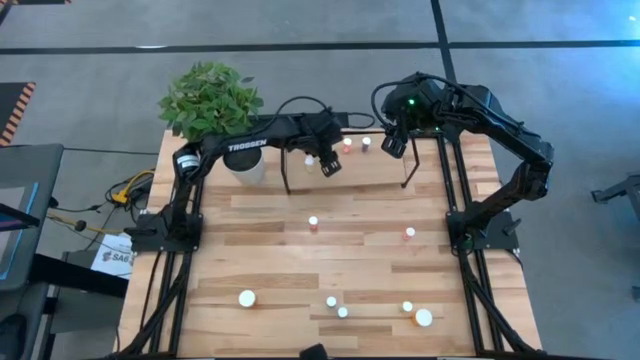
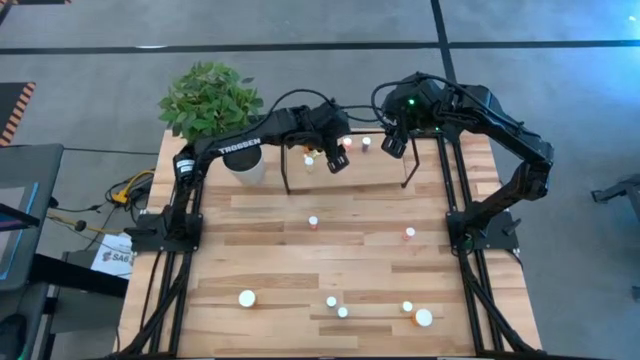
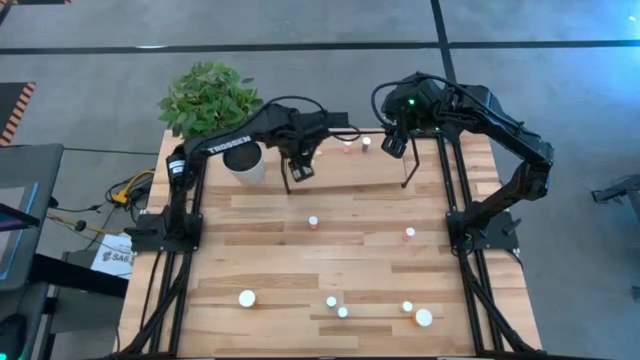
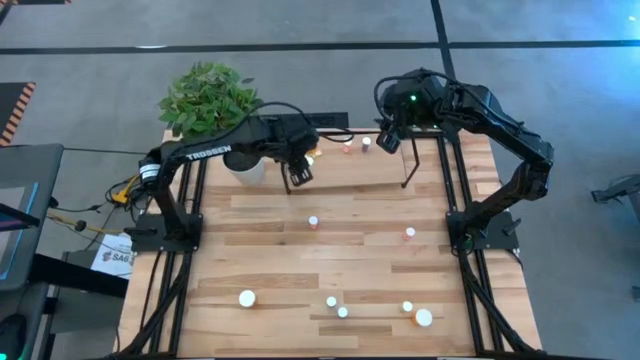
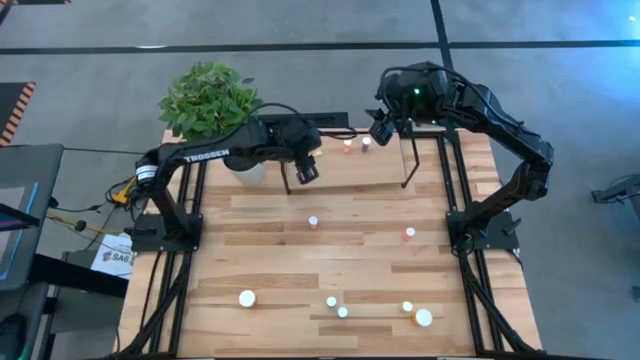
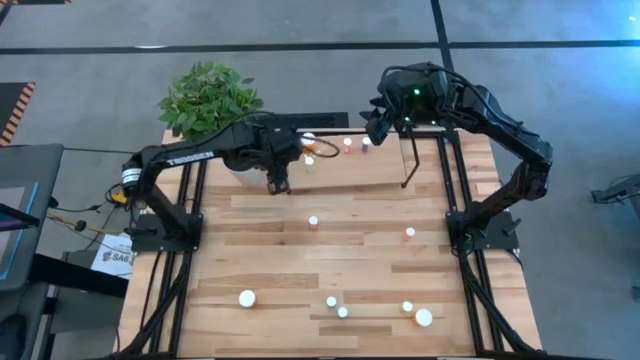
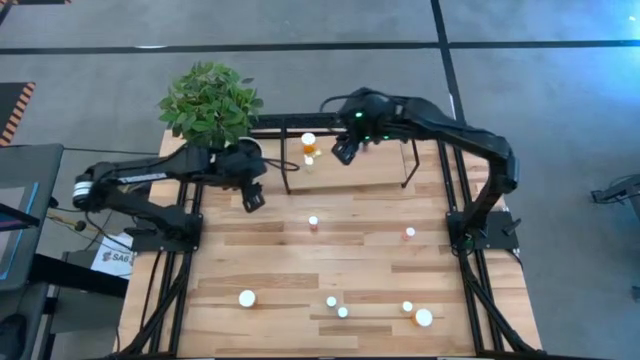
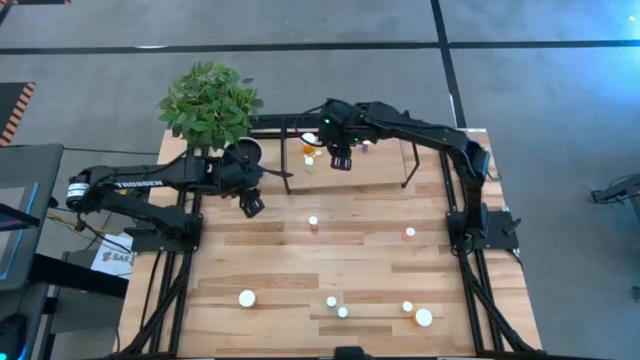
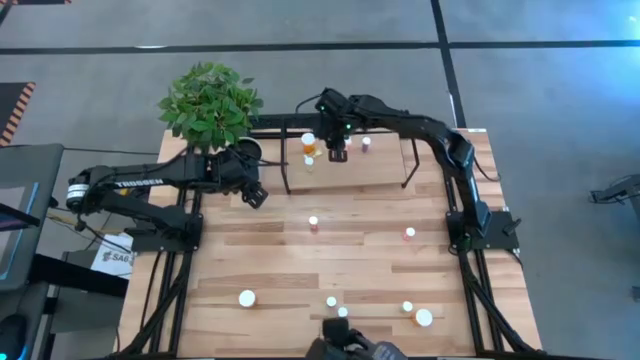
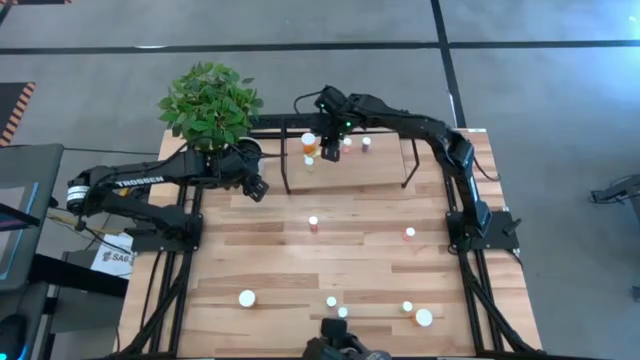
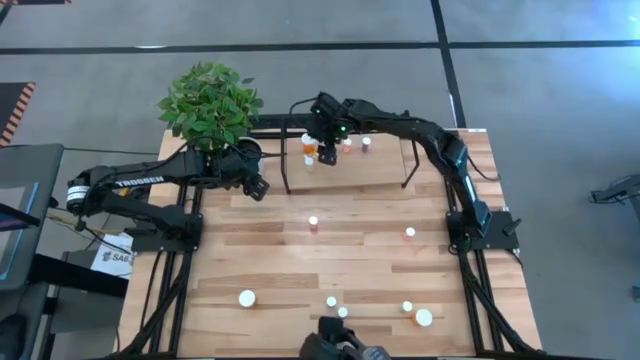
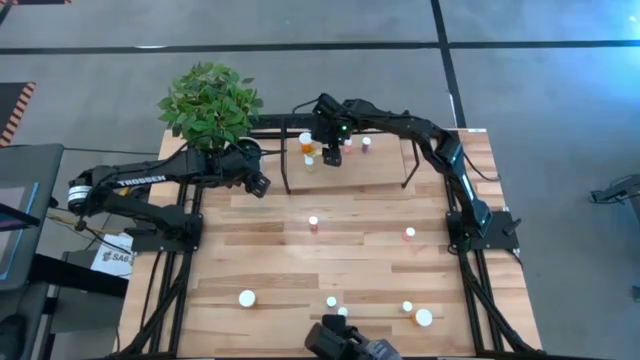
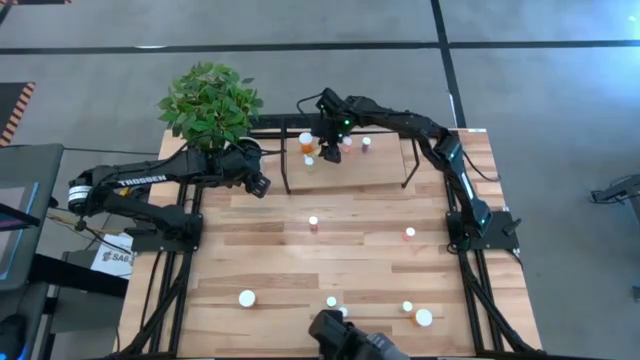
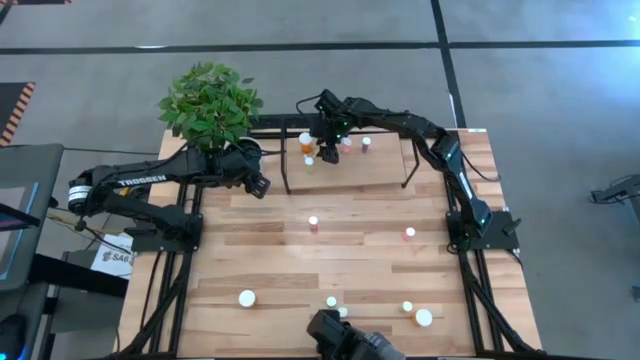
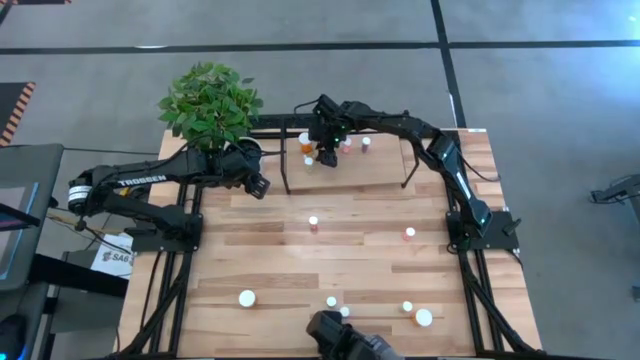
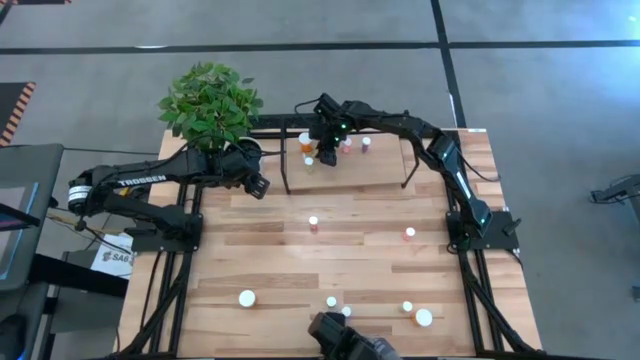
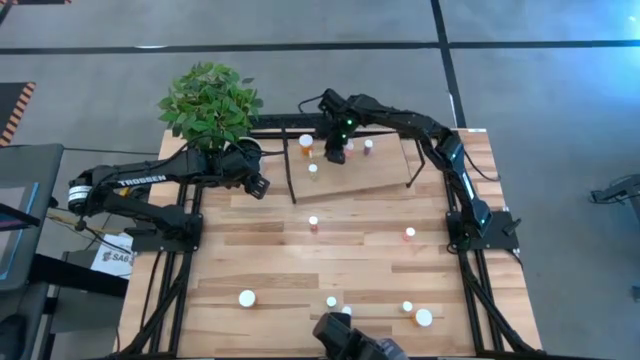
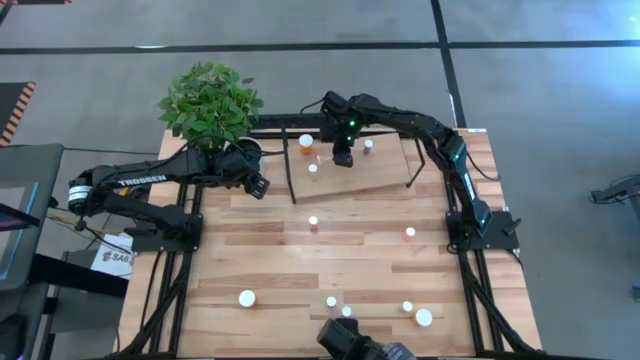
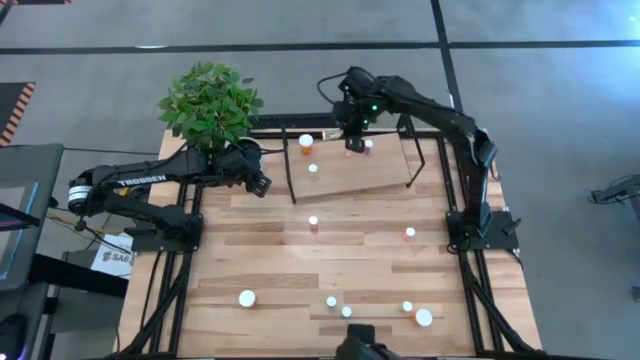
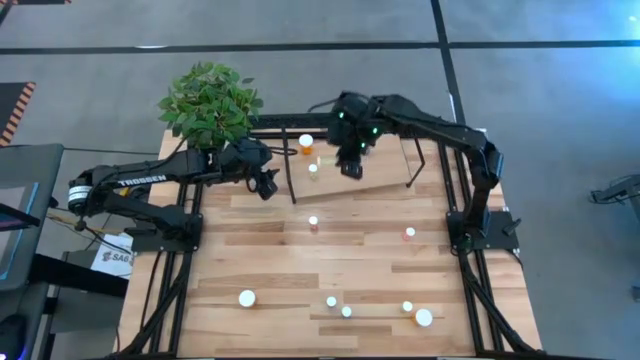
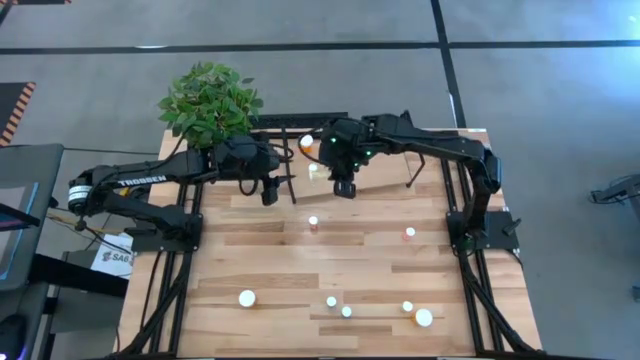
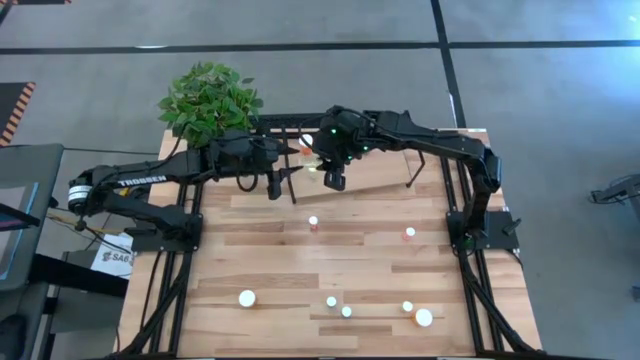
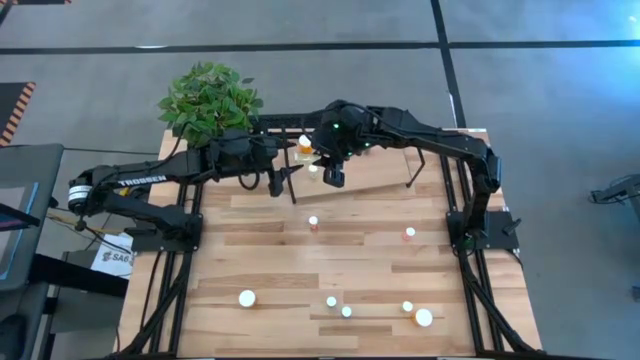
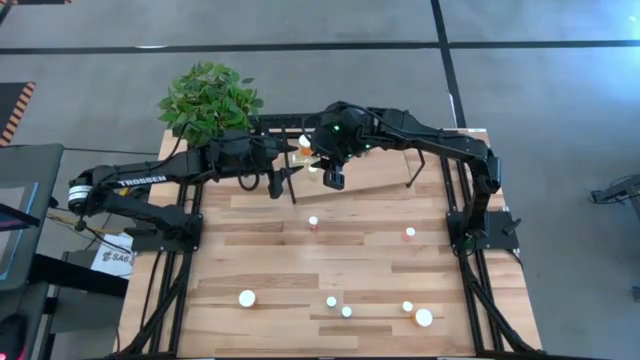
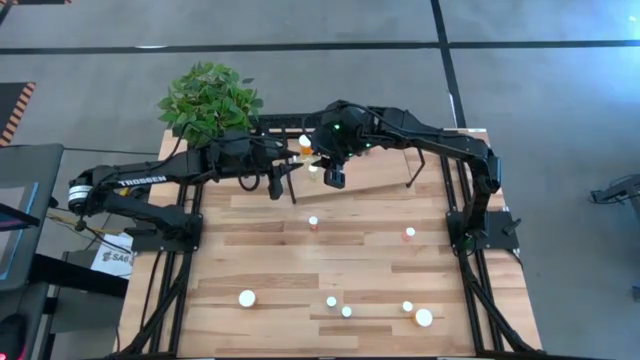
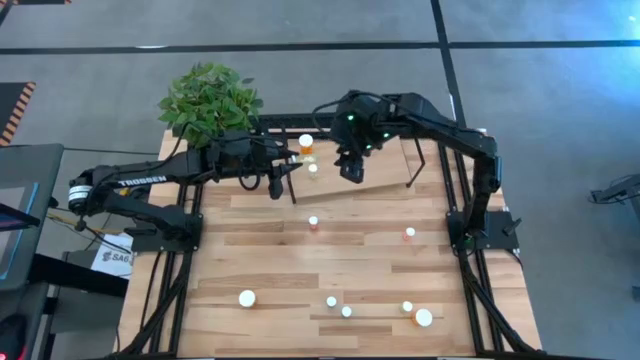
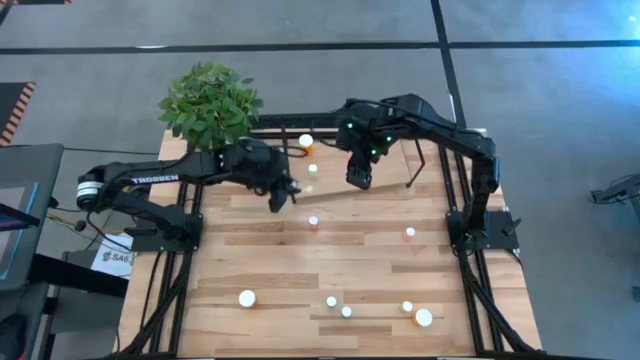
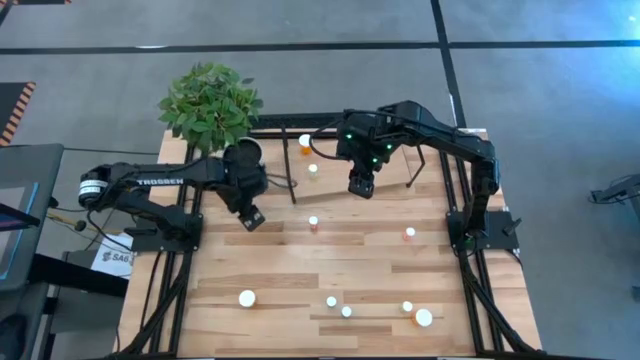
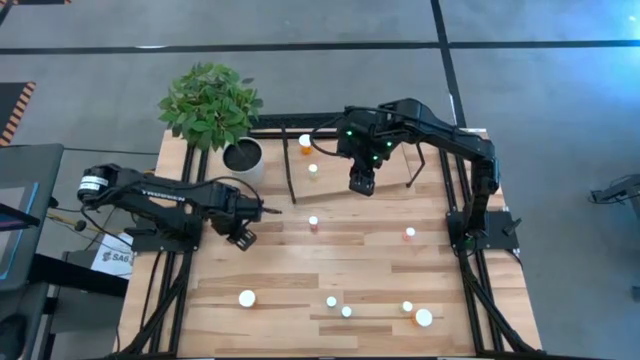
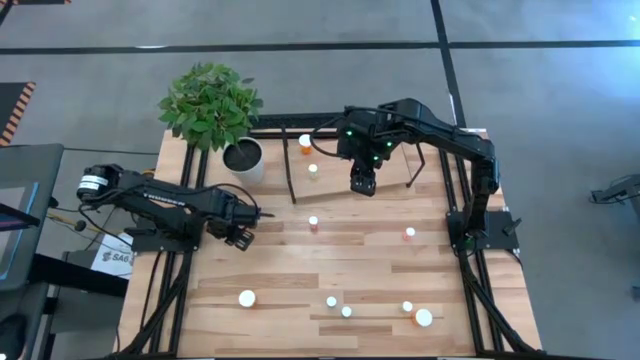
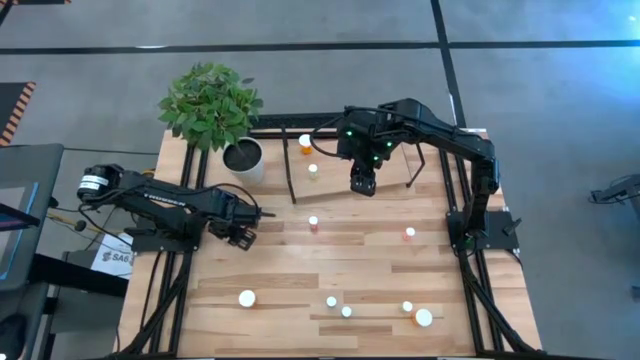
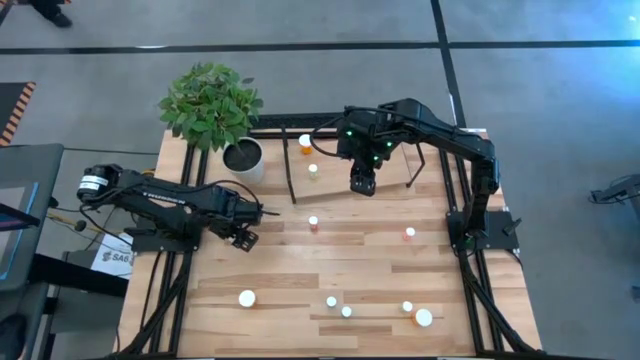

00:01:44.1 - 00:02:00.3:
Task: Pick and place medicine bottles onto shelf by color
Remove the top yellow pill bottle from the shelf

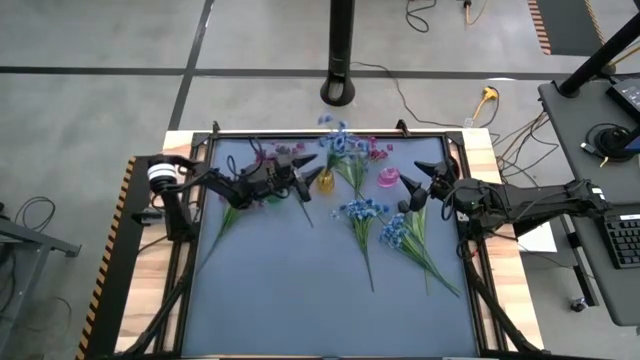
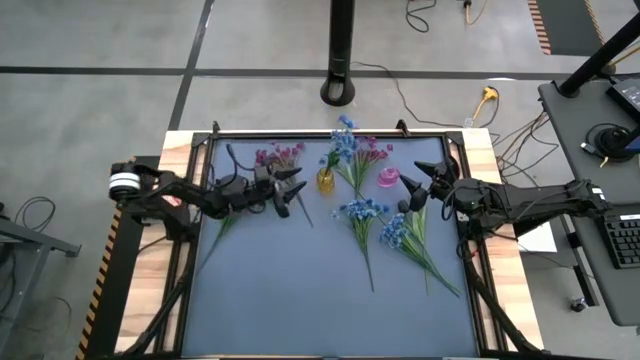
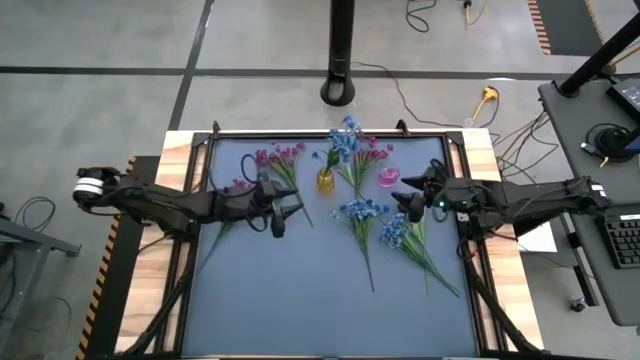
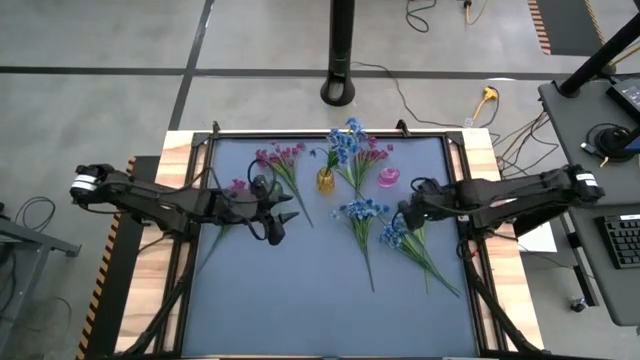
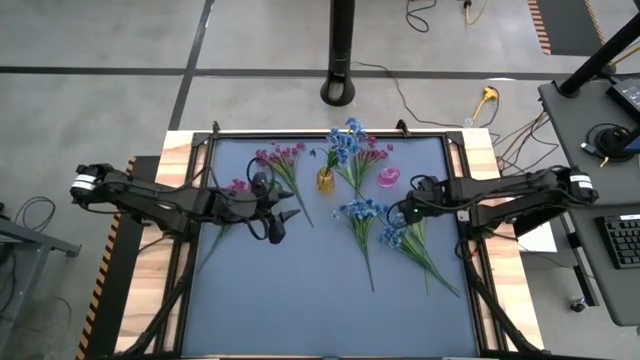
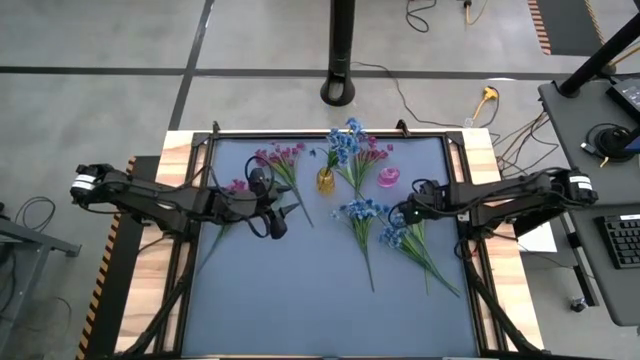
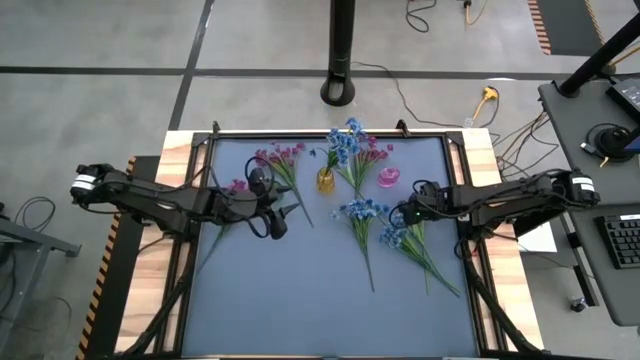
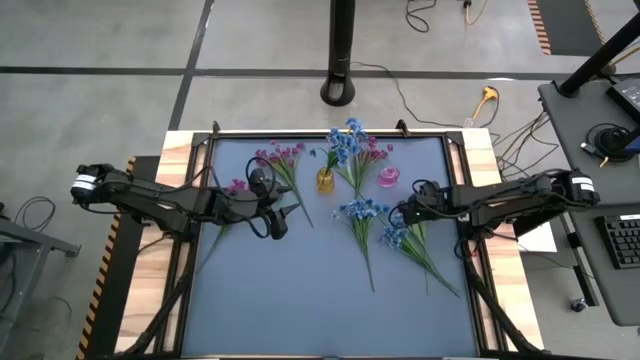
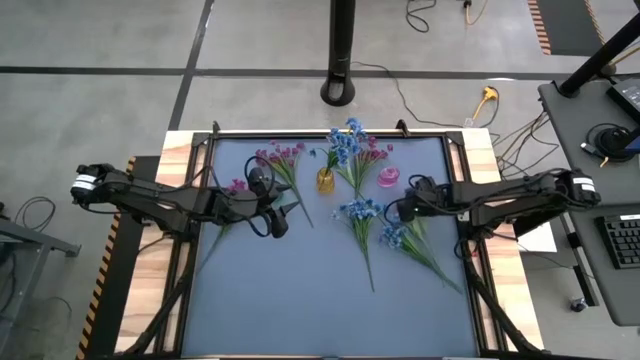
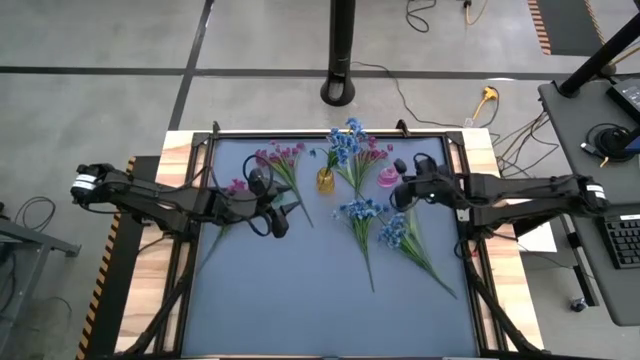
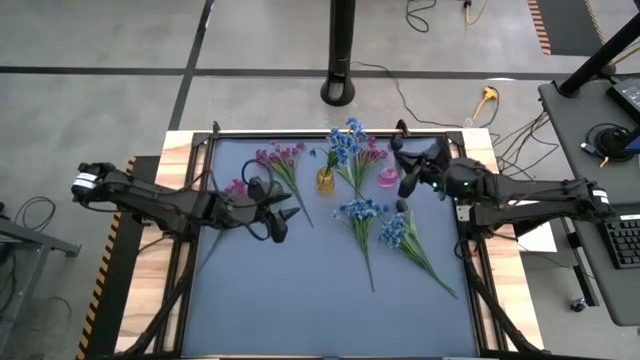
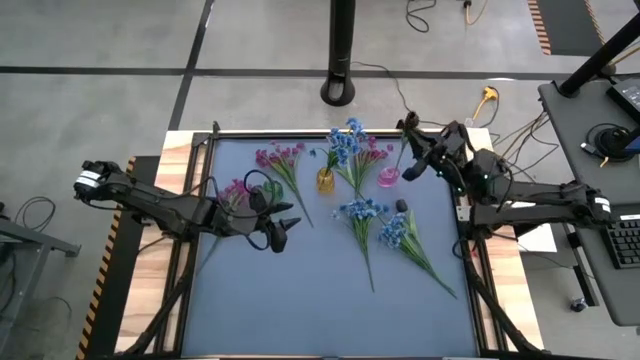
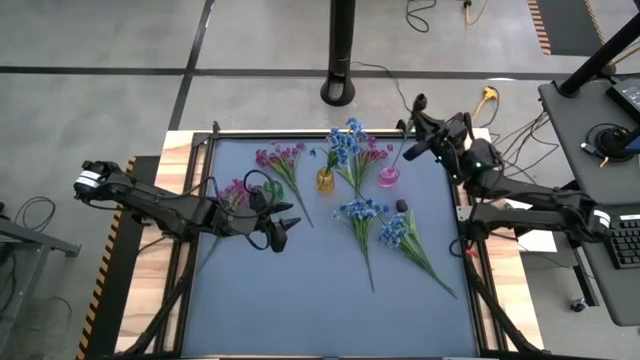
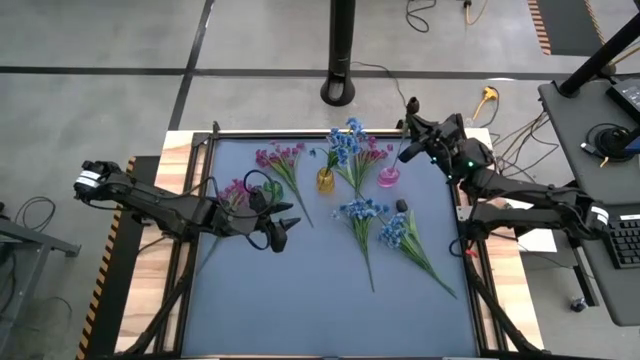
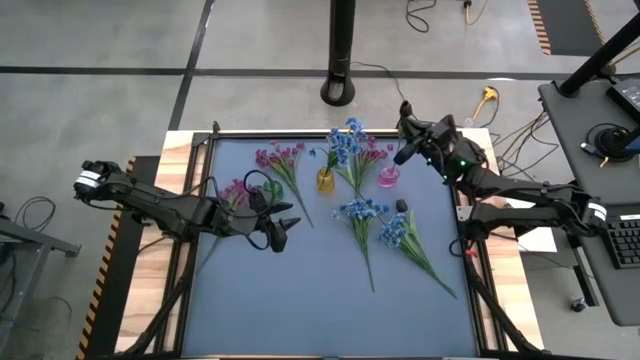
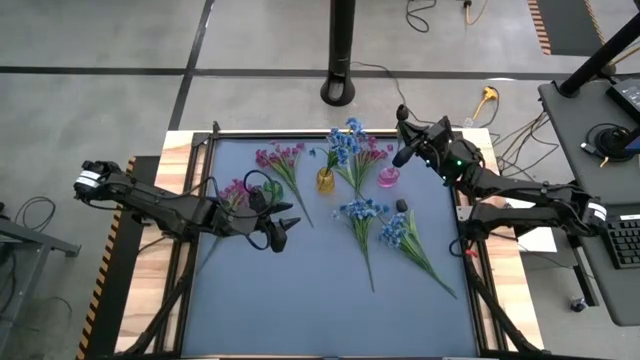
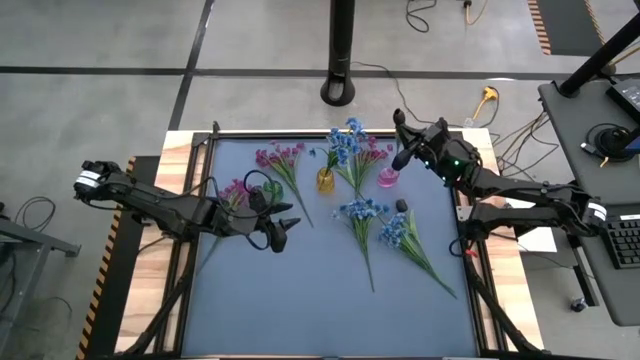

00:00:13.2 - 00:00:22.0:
Task: Sort flowers into vase by color
Put the bottom right black flower into the purple flower vase
